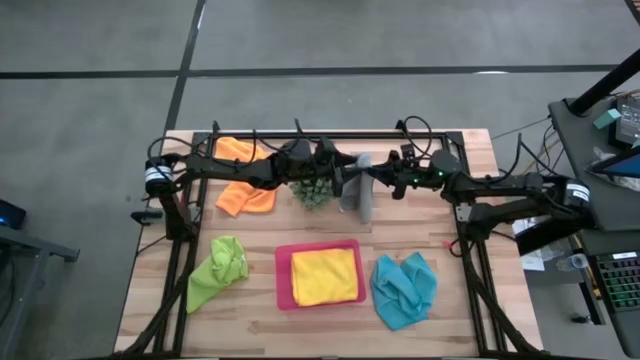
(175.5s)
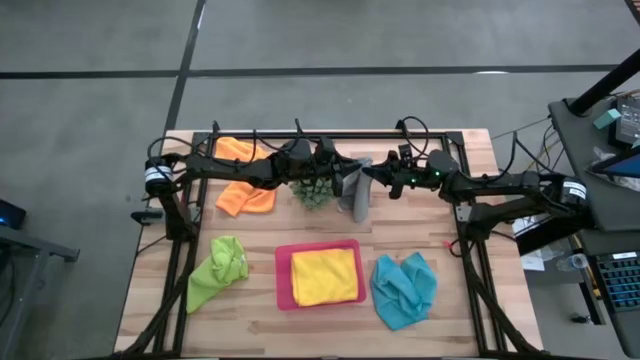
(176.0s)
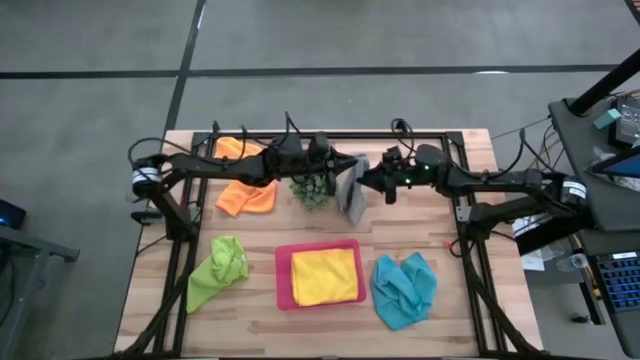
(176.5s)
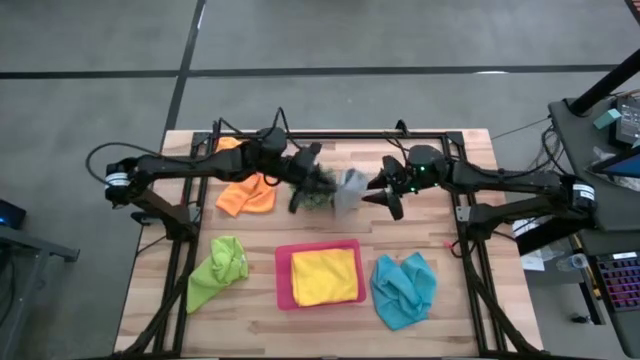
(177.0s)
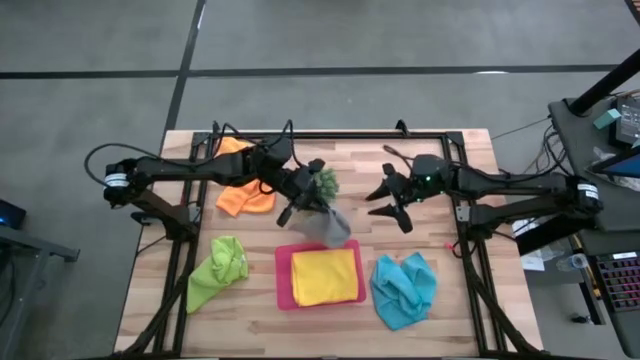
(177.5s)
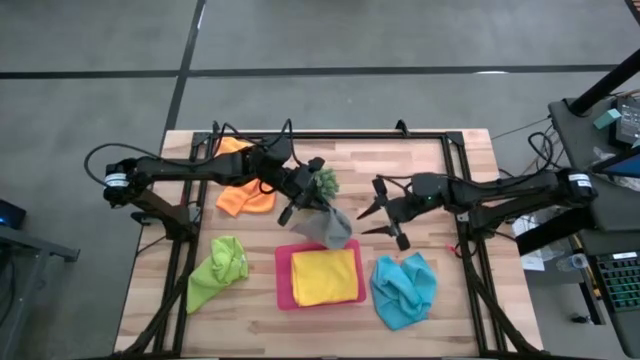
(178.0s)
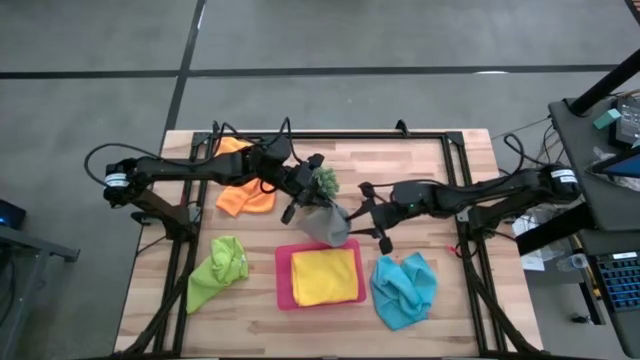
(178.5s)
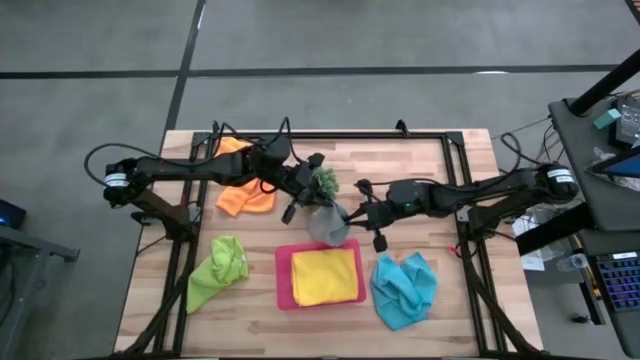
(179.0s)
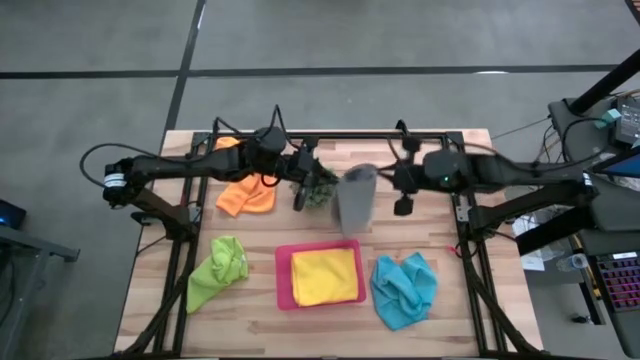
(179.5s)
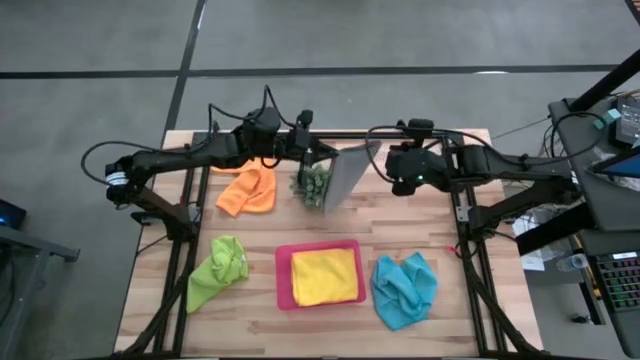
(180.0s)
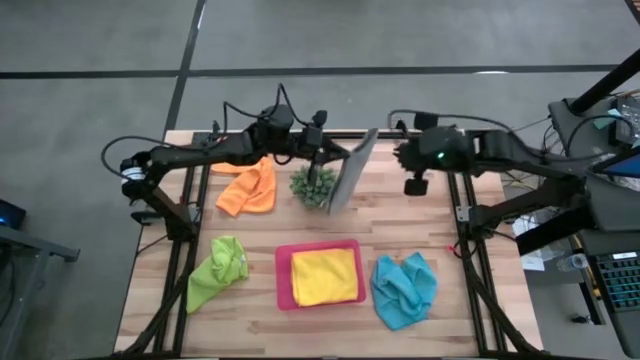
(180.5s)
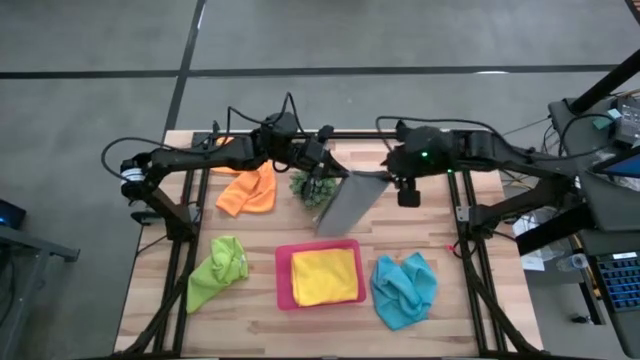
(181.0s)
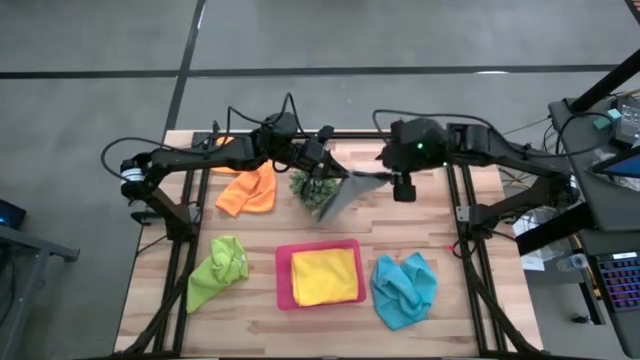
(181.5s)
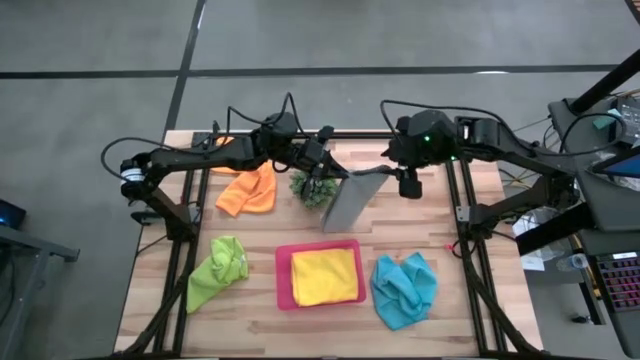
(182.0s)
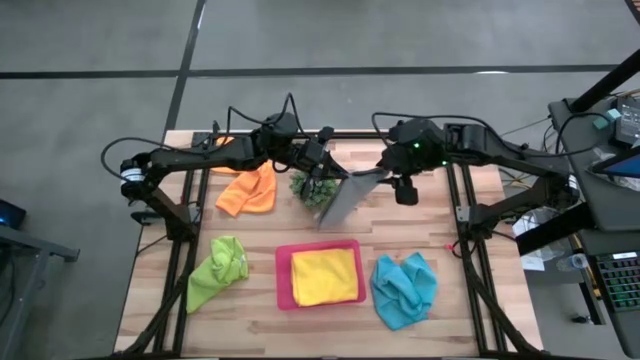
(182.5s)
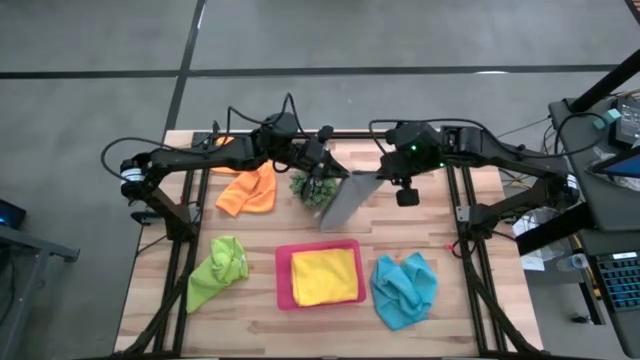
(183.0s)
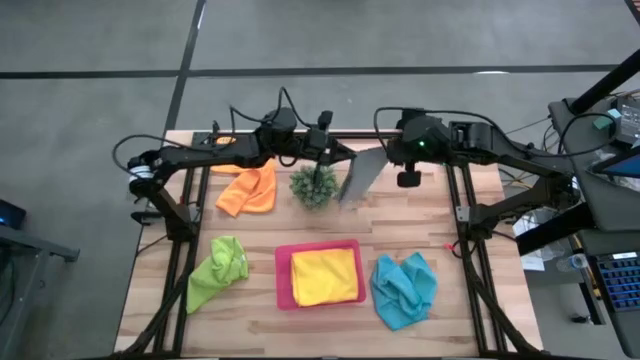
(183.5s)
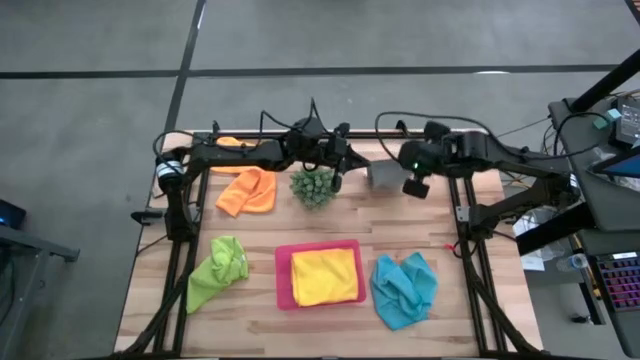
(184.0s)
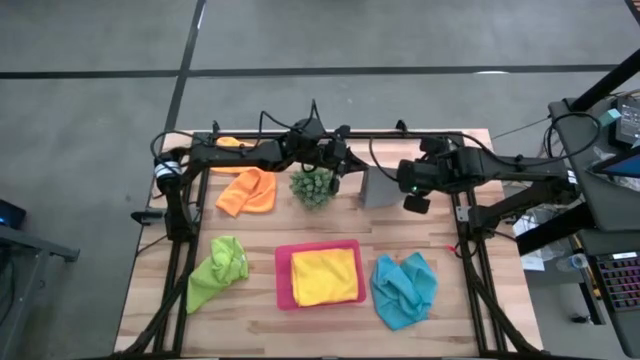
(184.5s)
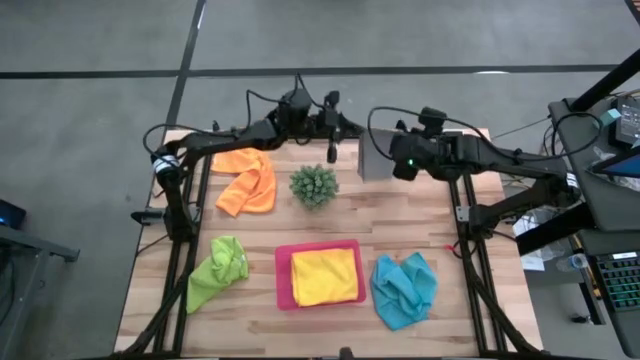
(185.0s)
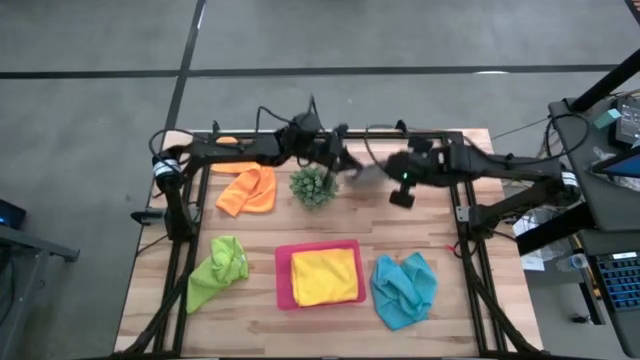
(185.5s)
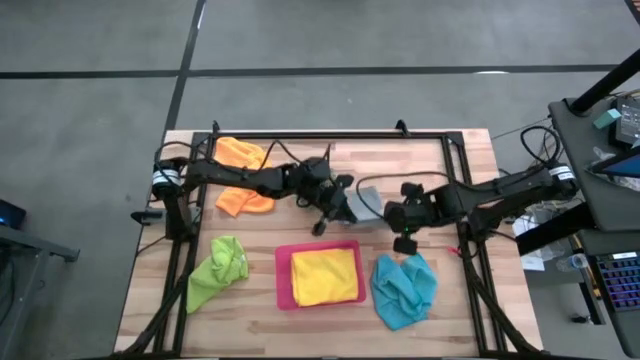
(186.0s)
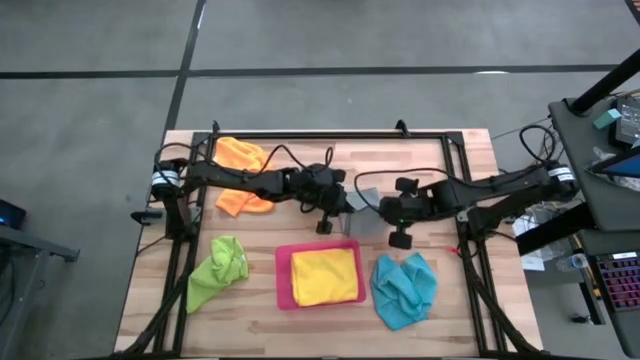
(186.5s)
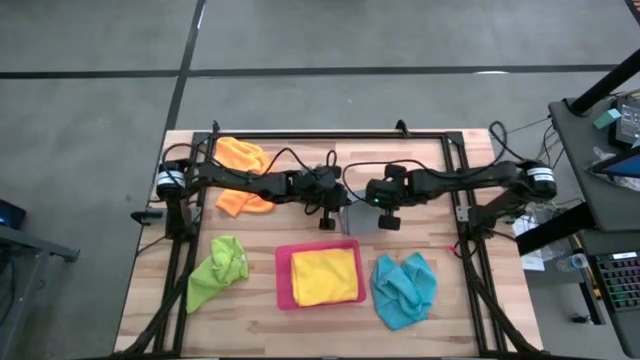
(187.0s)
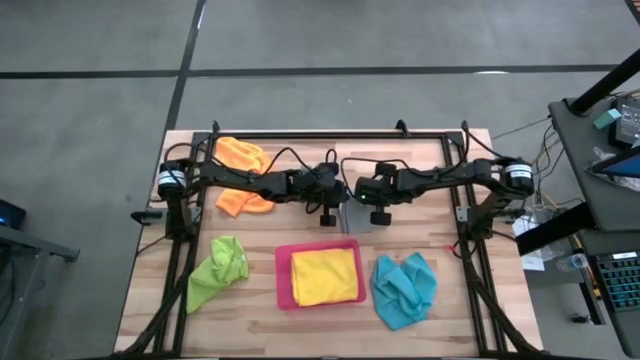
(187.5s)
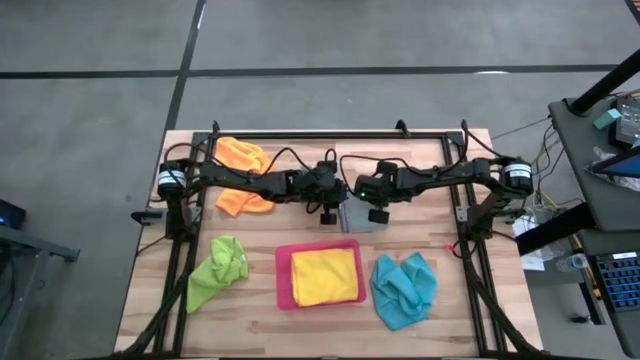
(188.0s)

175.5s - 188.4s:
Task: Fold microfiber towels
Fold the gray microfiber cloth

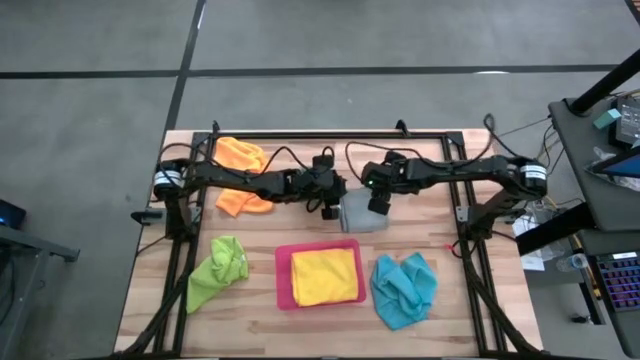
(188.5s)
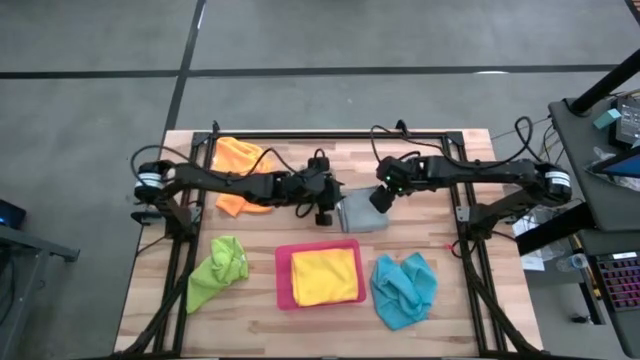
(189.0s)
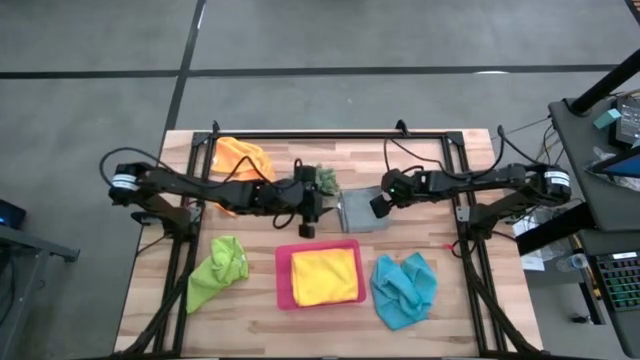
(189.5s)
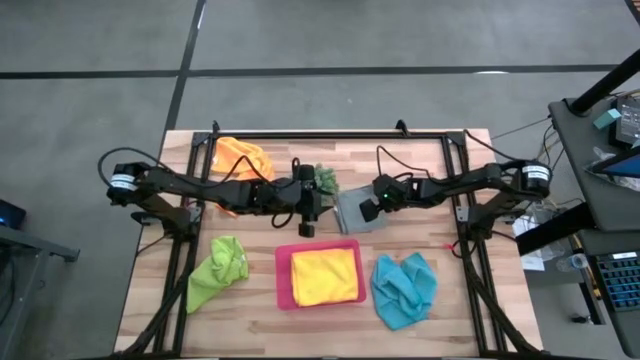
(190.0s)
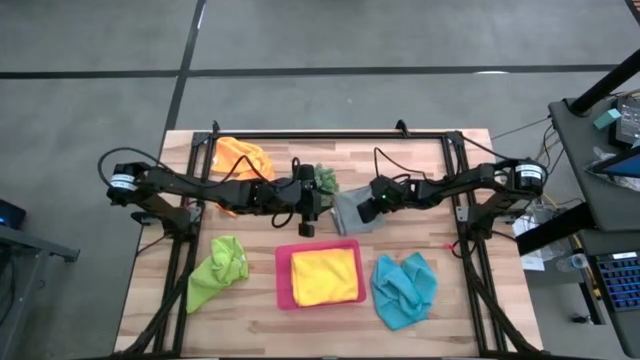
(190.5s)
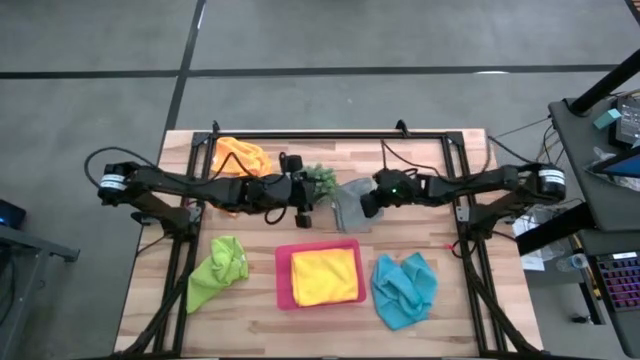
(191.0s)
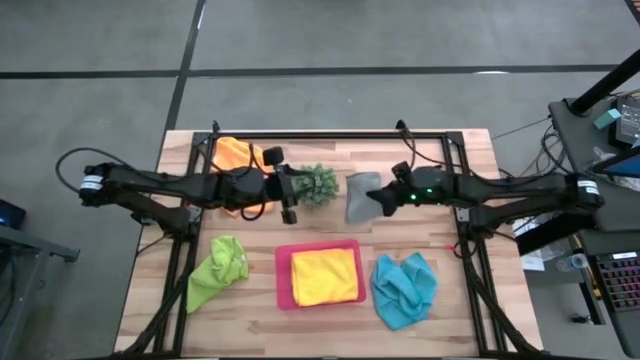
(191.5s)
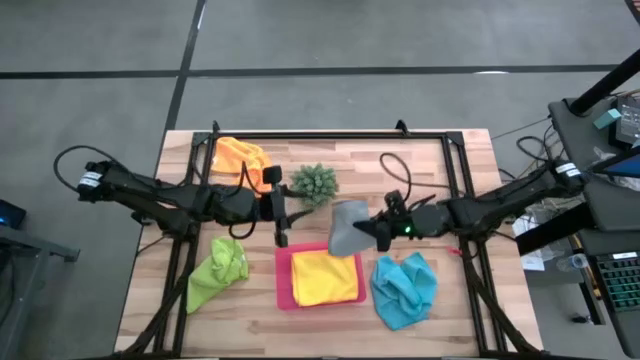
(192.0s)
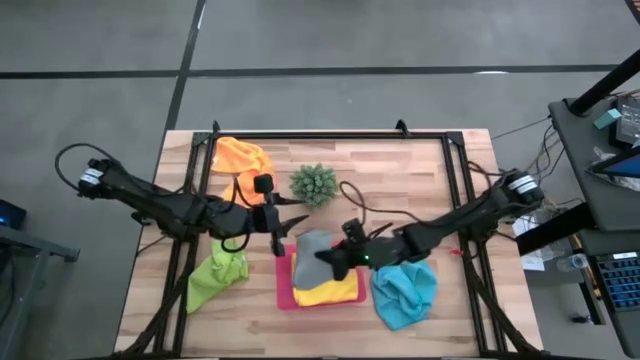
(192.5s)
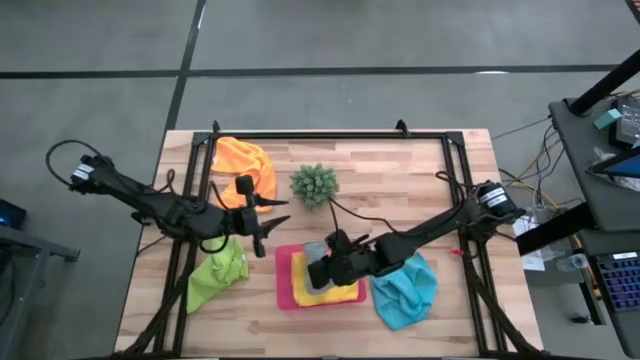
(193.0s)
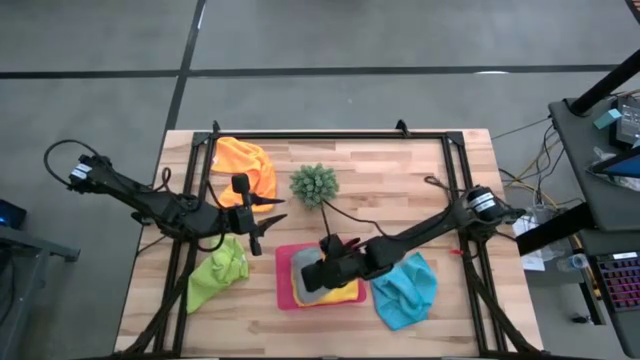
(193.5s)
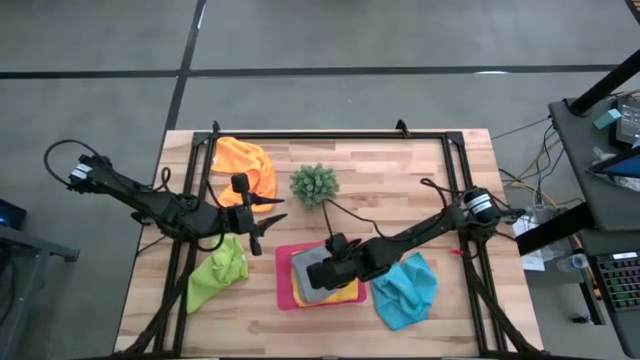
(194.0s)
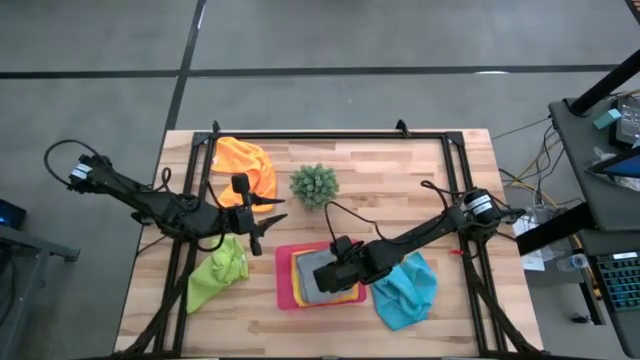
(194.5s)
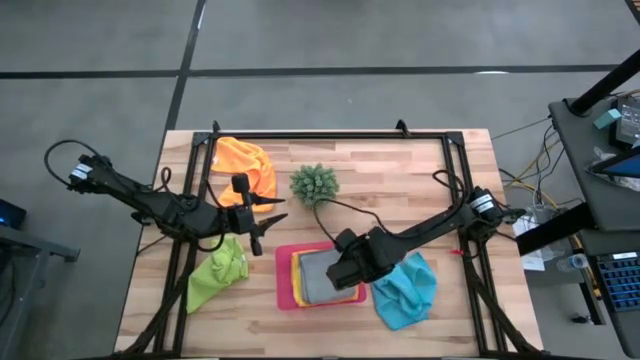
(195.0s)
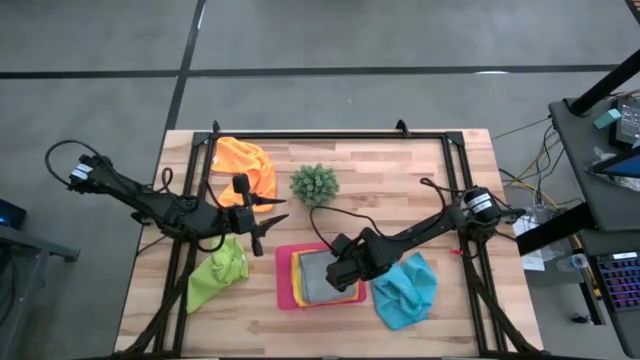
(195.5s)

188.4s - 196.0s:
Put the gray microfiber cloth into the pink bin
